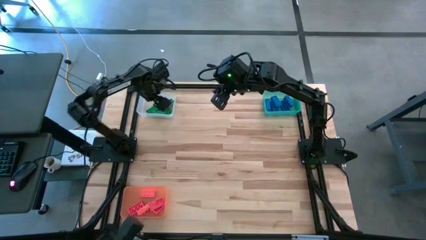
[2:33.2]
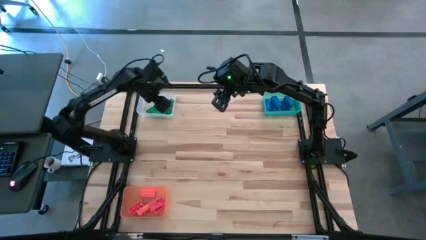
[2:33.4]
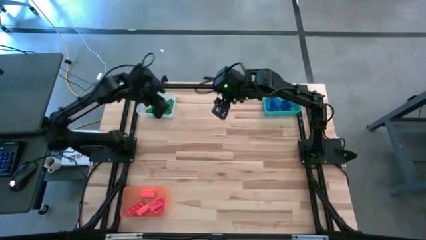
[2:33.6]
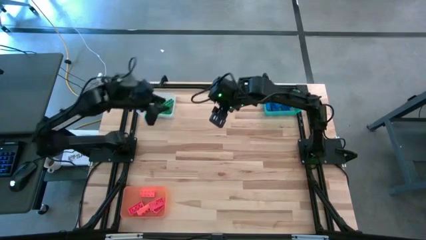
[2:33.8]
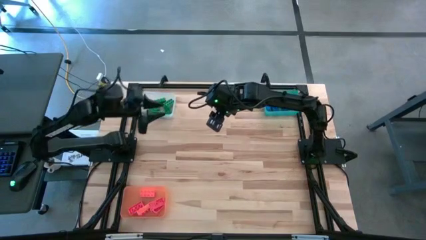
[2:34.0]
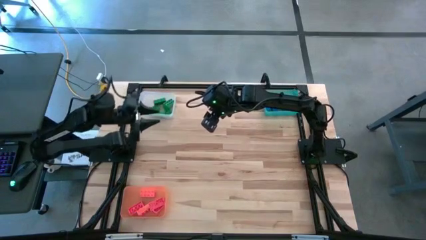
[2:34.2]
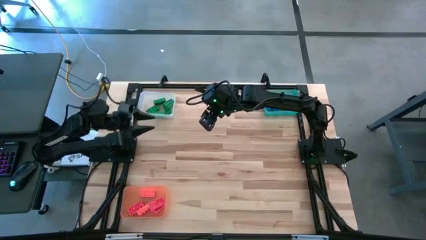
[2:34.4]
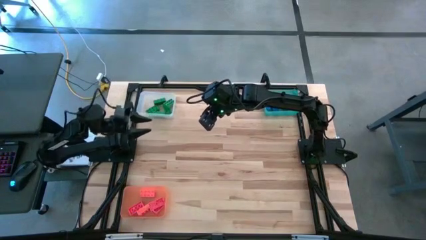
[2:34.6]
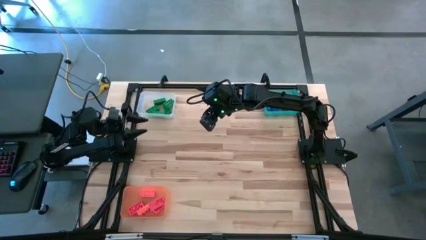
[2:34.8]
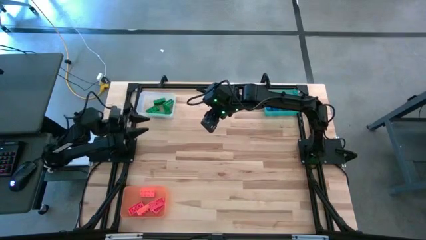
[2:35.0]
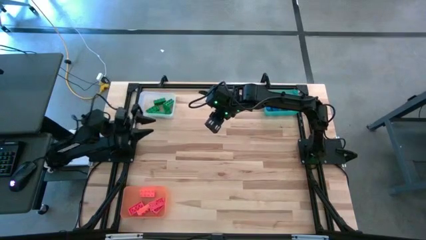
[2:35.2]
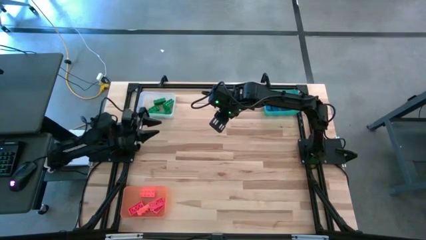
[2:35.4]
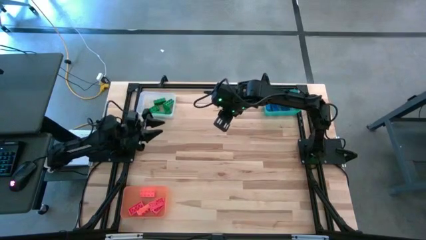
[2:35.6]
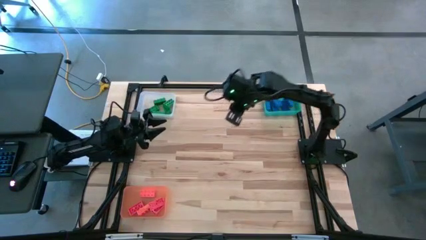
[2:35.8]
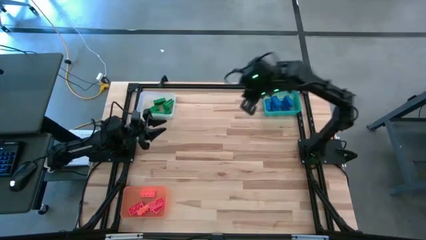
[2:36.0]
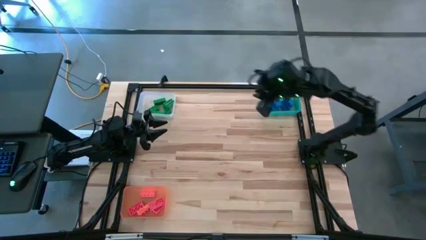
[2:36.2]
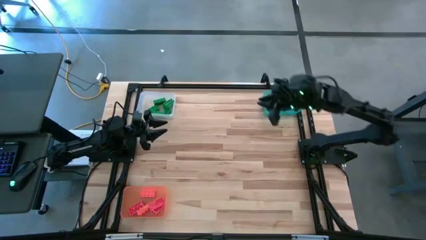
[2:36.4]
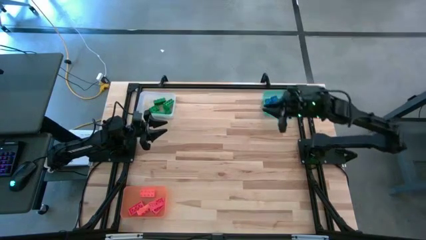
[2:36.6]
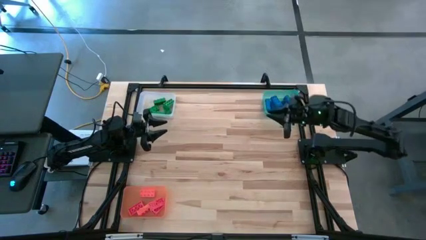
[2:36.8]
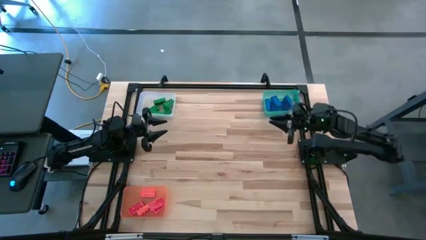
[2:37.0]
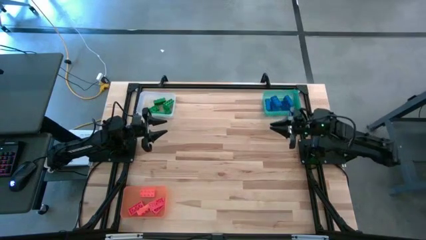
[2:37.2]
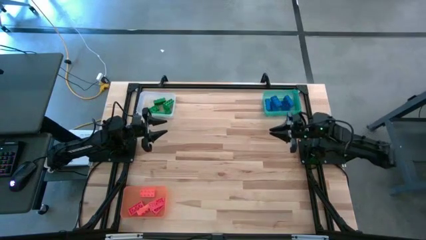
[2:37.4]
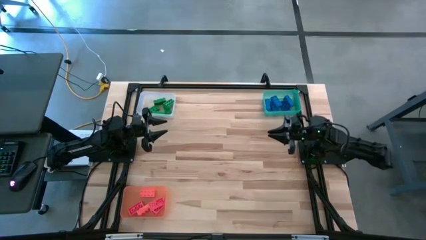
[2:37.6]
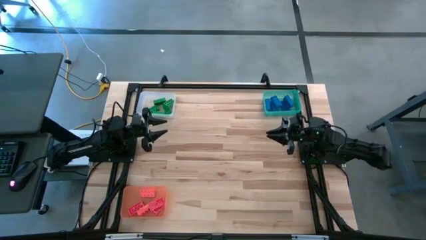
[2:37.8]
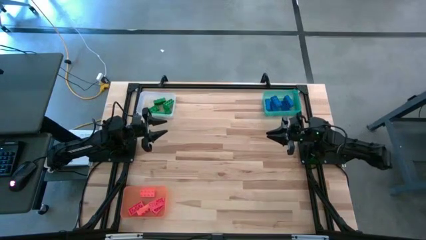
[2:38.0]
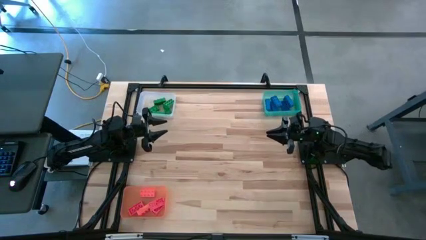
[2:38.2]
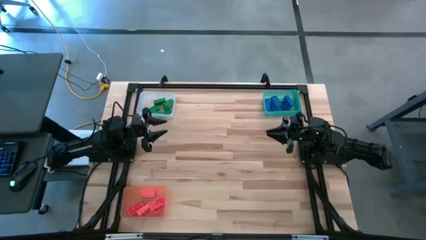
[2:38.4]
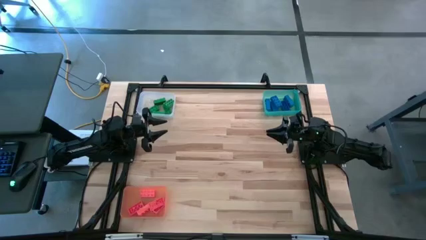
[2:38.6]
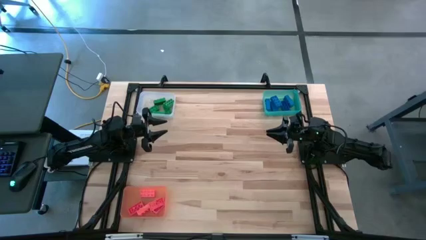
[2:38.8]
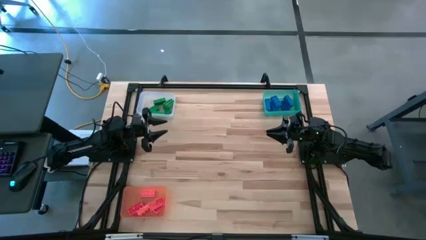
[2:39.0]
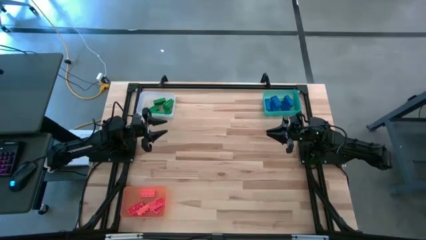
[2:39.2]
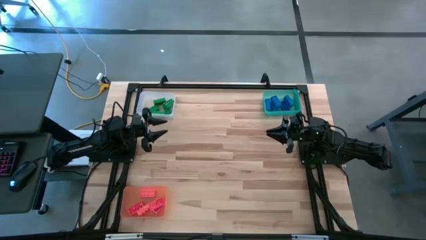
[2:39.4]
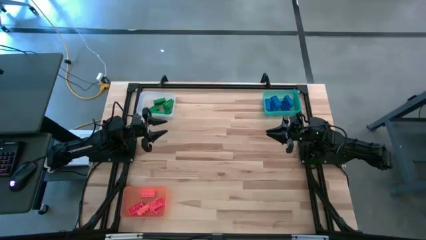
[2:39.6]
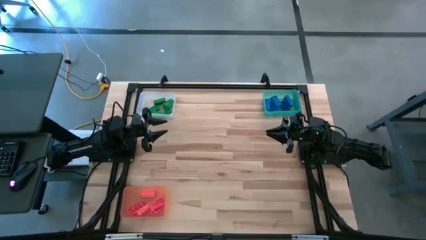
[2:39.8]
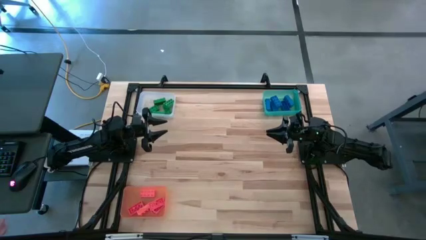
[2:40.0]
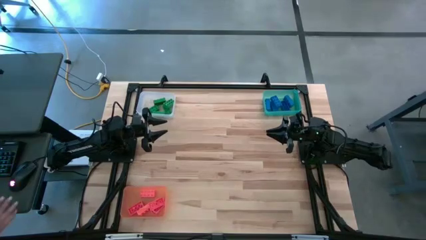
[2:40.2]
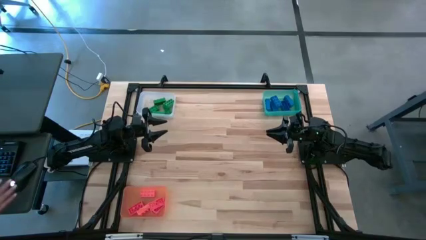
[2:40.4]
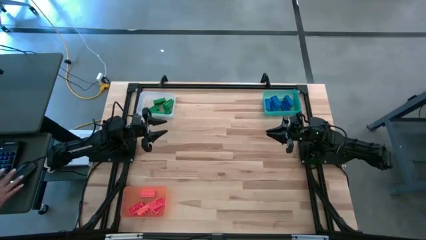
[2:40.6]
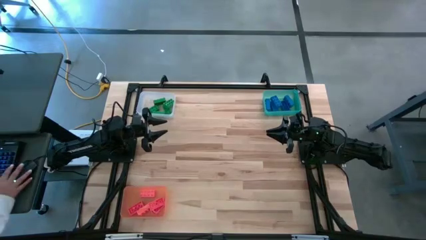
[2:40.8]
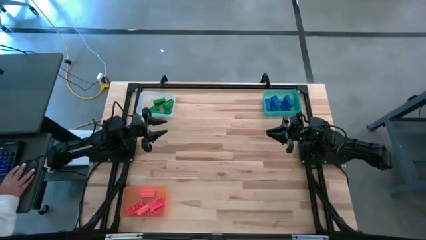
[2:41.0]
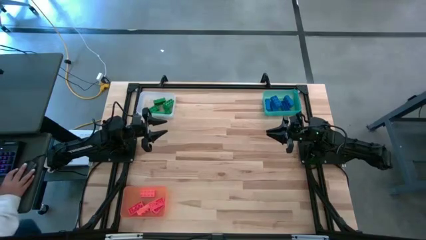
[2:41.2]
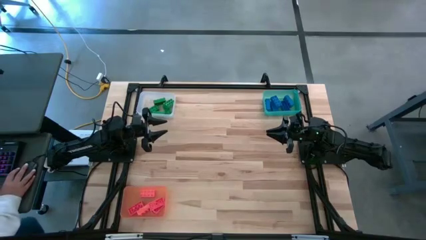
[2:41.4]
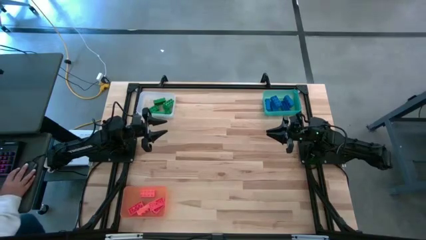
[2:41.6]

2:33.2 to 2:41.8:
Task: Sort & place blocks by color
Return to Home Position

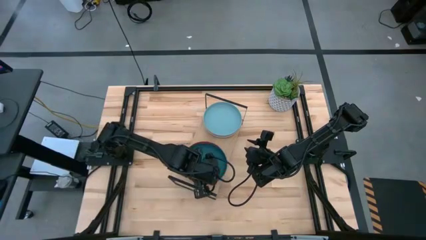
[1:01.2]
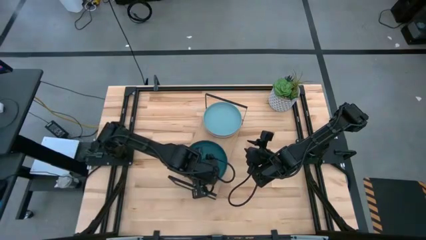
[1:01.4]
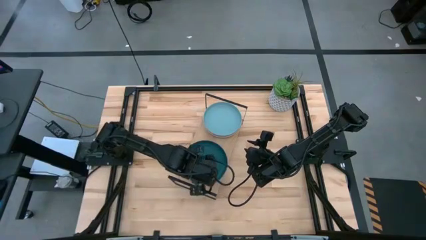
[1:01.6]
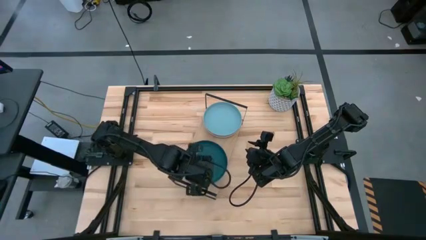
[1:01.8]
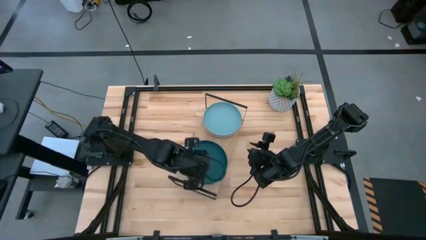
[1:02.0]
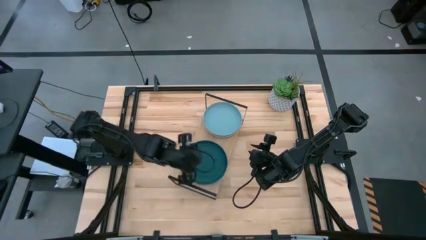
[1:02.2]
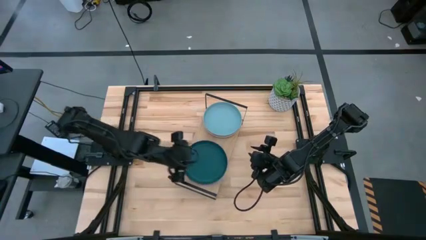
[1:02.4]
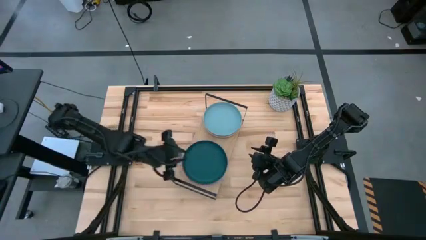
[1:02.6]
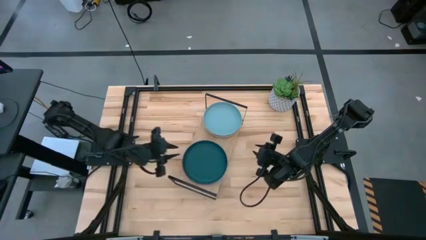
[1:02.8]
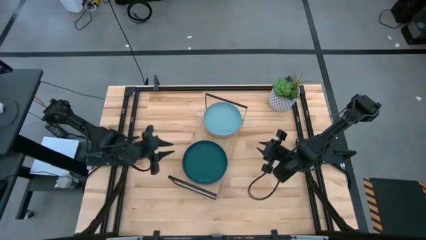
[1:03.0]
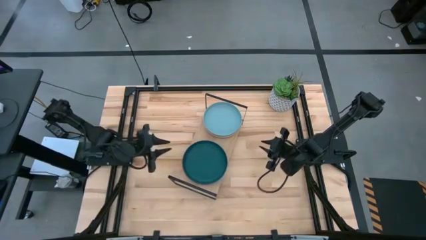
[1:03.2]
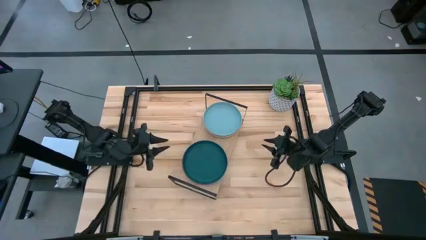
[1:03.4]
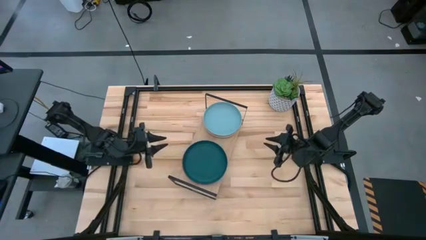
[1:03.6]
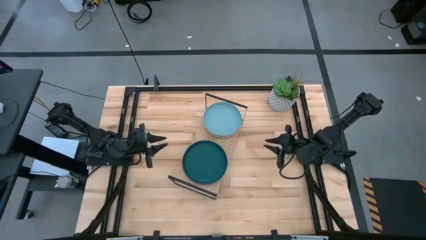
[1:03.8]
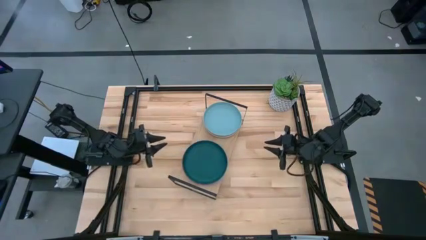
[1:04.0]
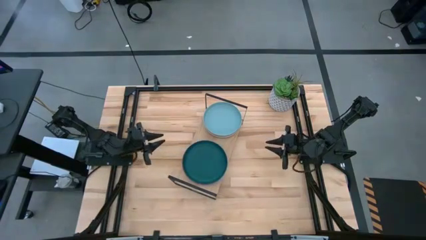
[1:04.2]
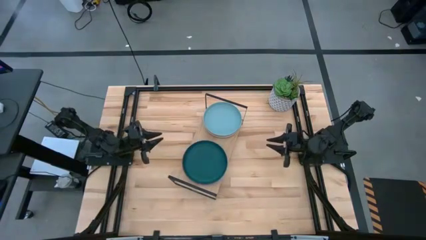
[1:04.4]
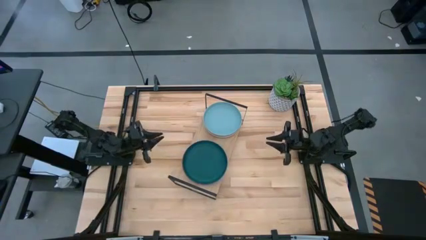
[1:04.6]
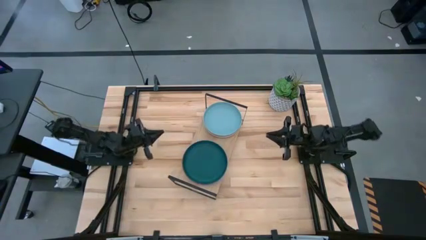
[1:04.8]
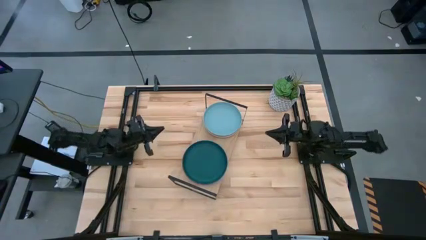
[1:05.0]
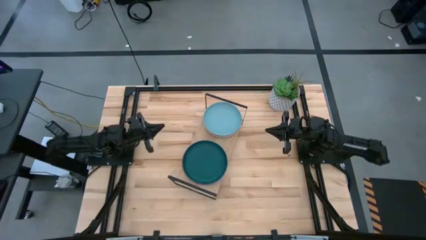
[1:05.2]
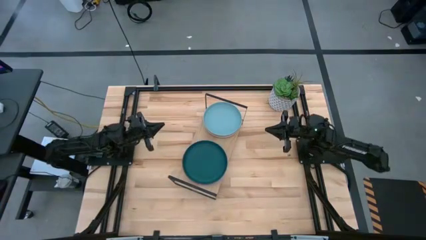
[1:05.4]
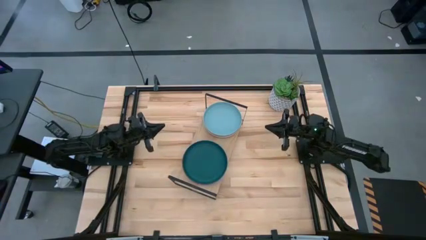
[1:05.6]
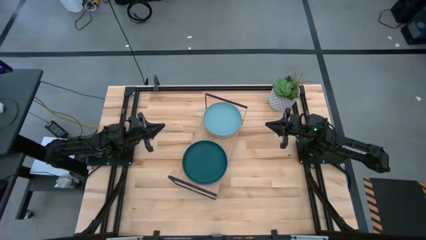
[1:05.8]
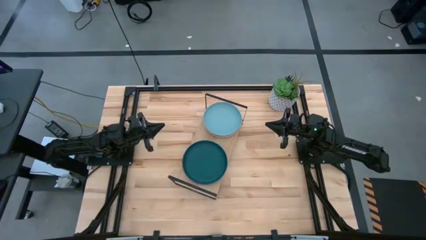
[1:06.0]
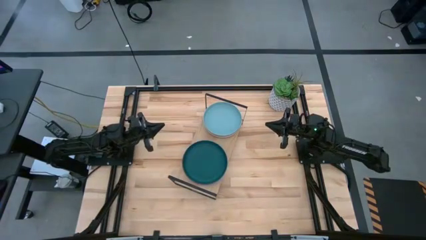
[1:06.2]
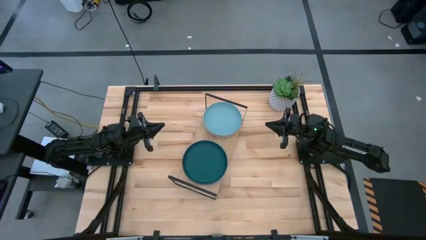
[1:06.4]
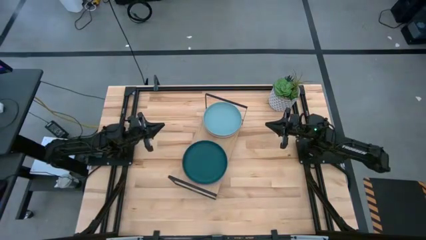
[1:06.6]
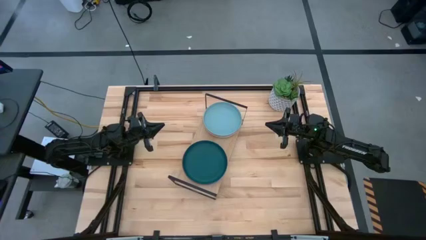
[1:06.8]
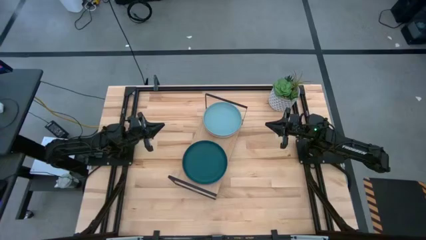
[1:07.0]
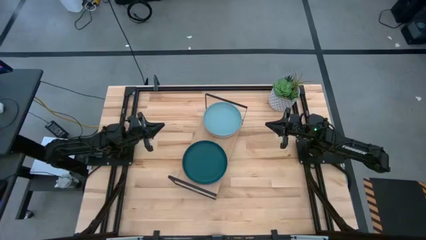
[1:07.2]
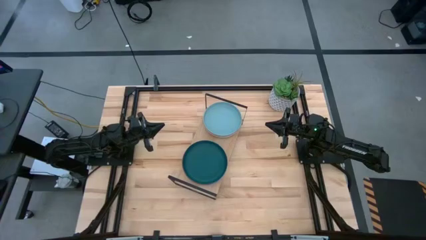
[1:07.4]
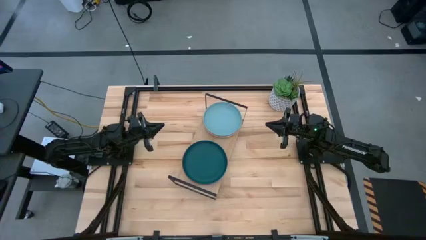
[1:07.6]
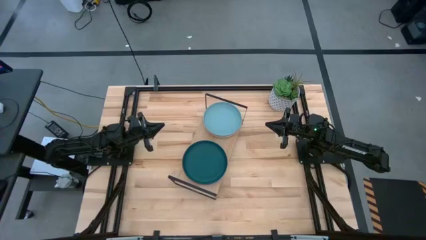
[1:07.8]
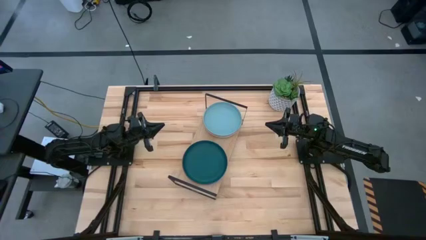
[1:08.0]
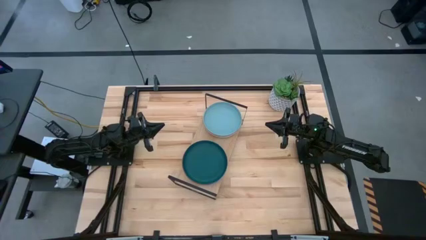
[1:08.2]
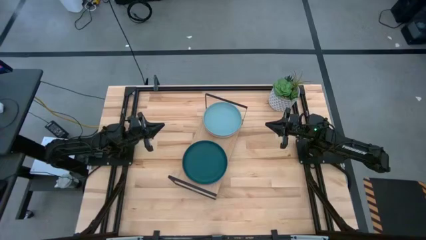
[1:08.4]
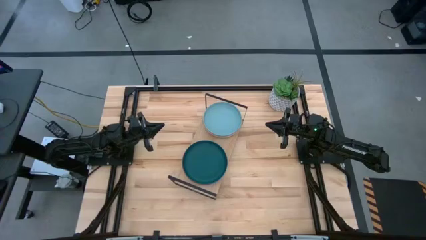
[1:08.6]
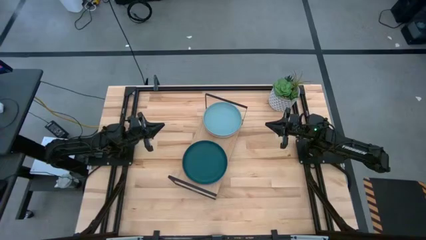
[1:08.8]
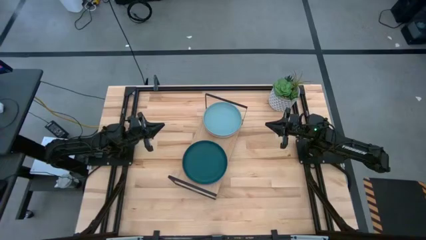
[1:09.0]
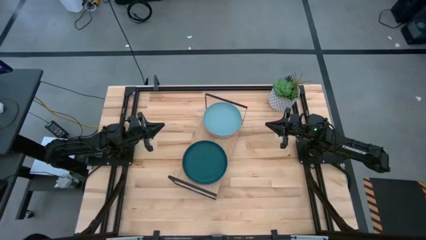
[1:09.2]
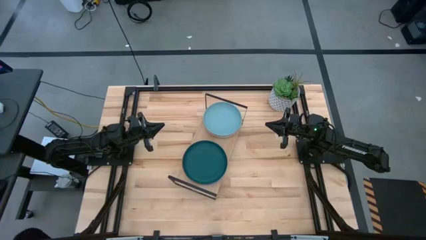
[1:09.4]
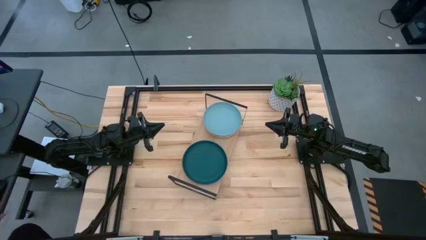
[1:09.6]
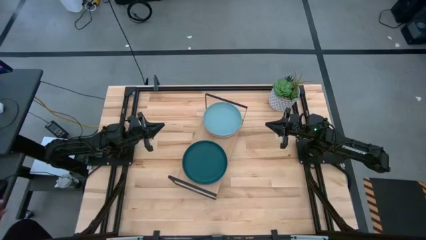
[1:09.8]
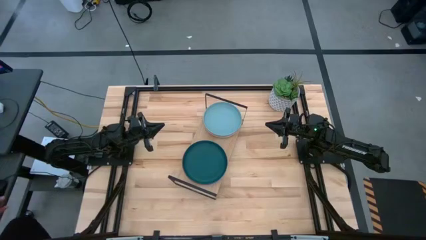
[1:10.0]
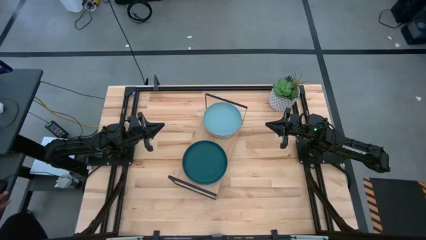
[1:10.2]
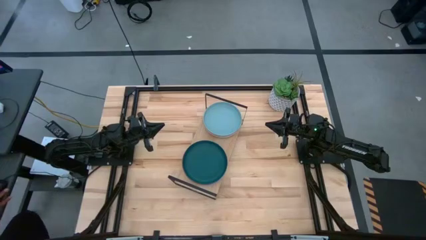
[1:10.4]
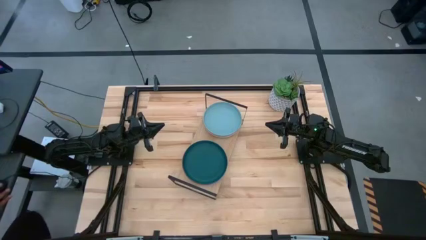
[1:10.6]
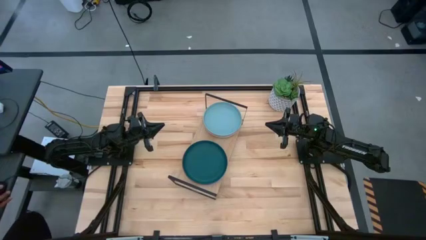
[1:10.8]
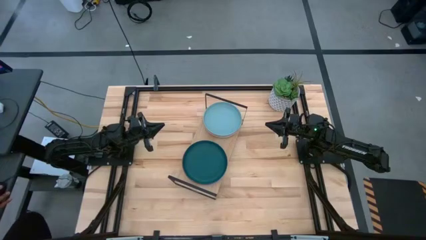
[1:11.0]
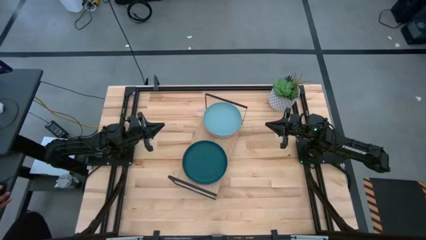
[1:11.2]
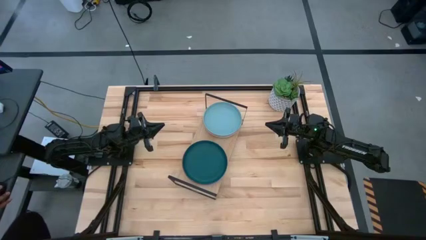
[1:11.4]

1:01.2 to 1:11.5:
Task: Place and stack plates onto a shelf
Return to Home Position
